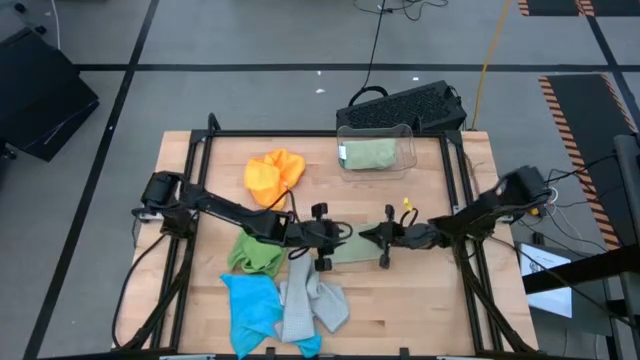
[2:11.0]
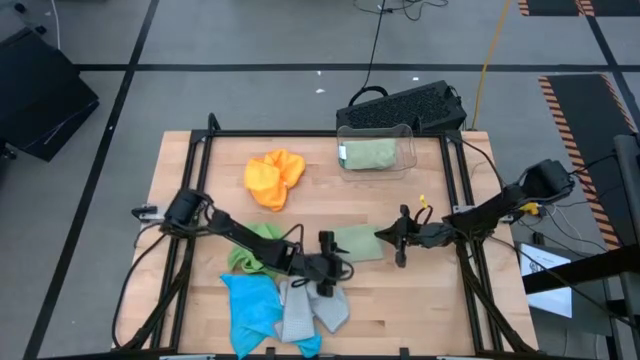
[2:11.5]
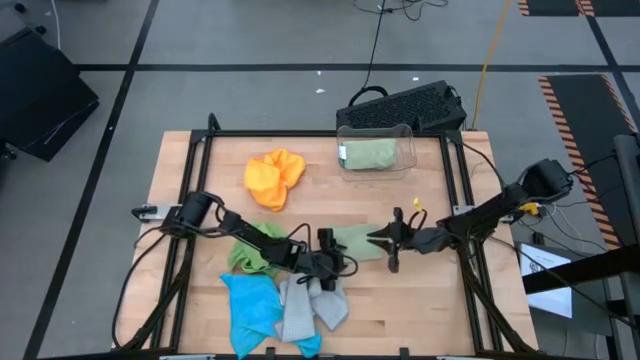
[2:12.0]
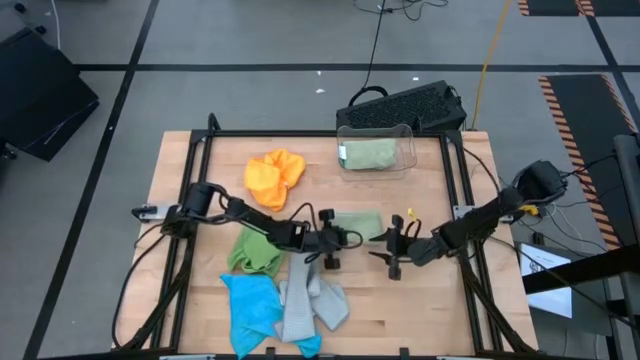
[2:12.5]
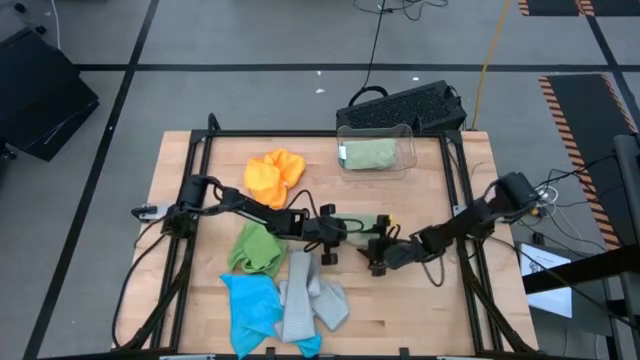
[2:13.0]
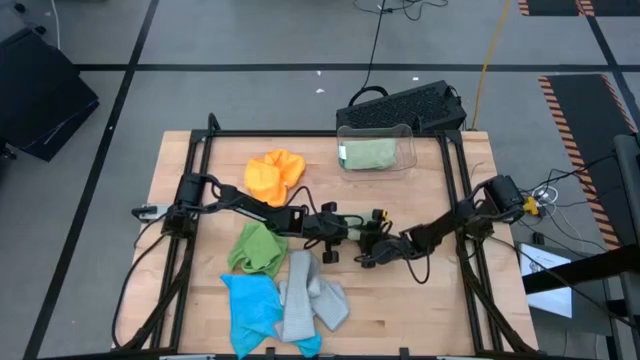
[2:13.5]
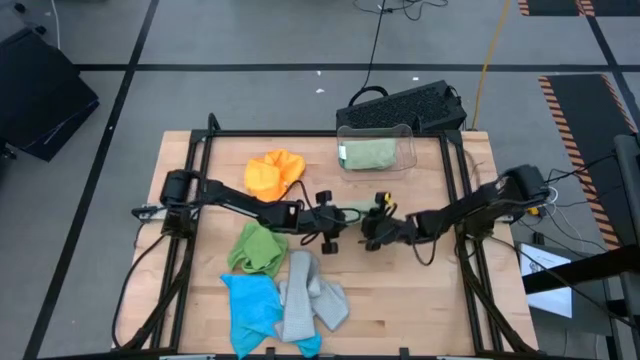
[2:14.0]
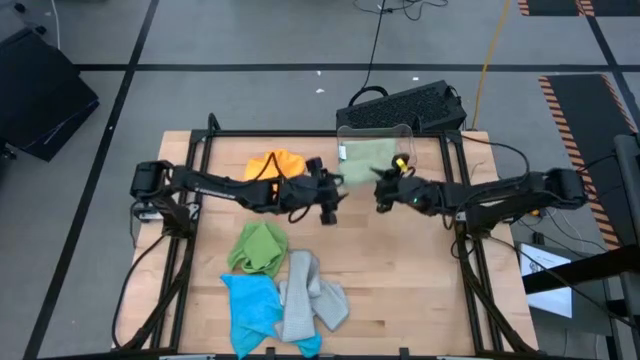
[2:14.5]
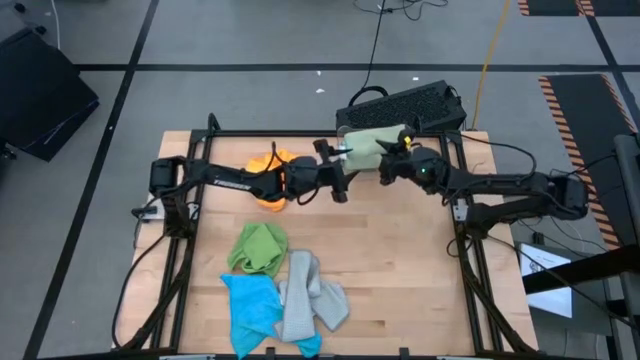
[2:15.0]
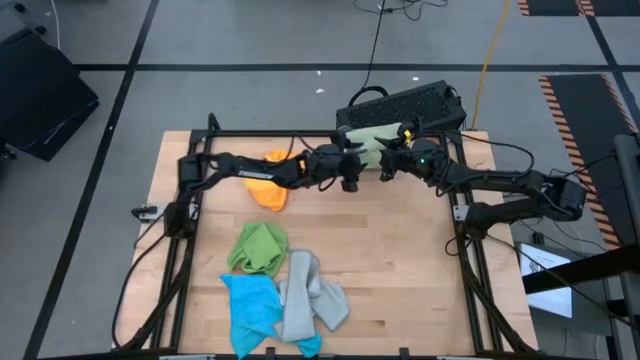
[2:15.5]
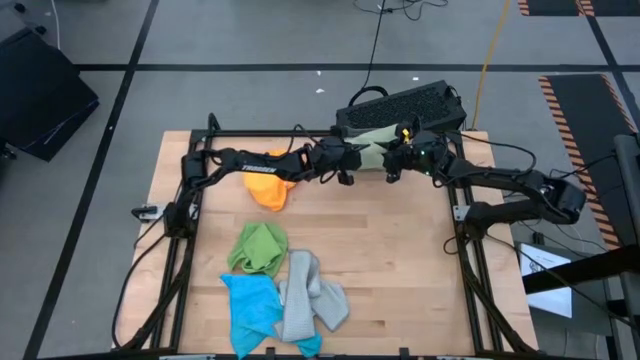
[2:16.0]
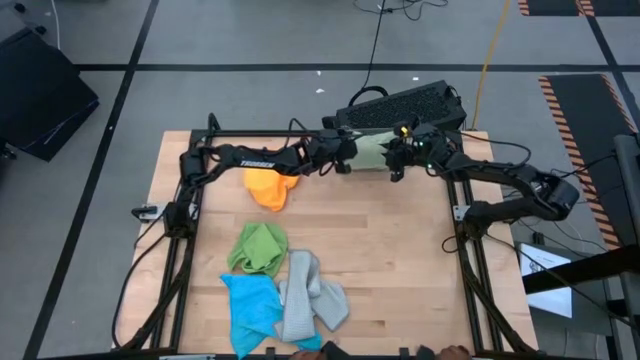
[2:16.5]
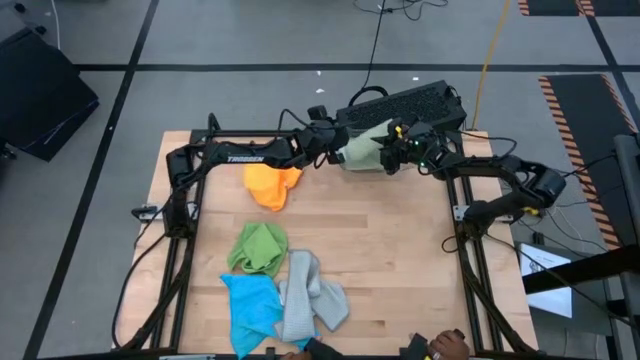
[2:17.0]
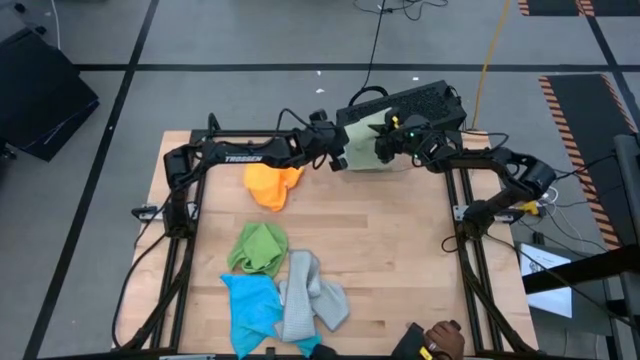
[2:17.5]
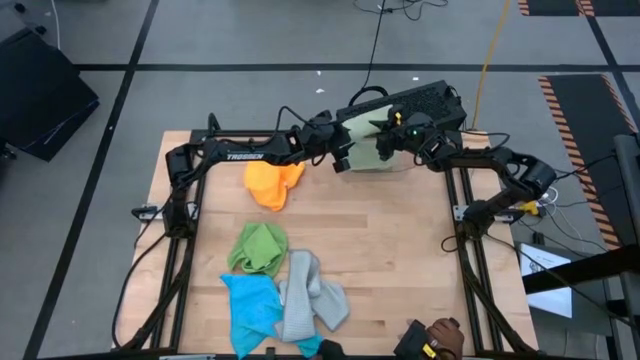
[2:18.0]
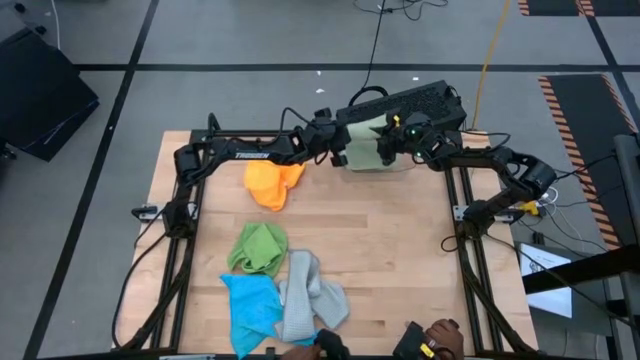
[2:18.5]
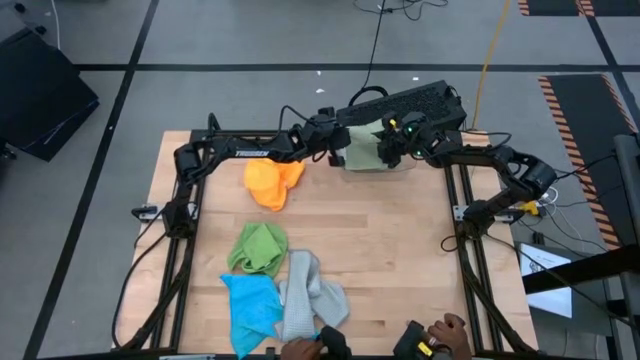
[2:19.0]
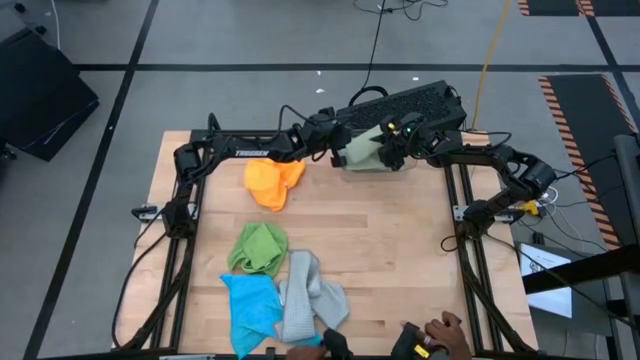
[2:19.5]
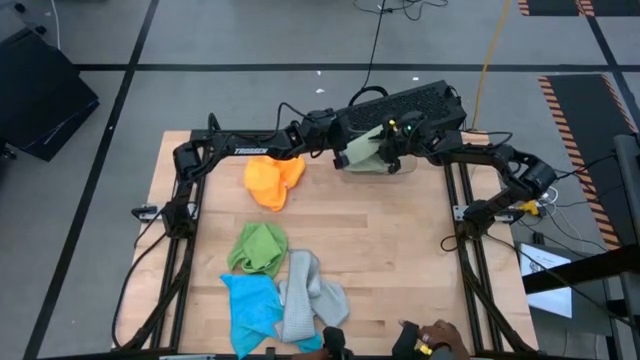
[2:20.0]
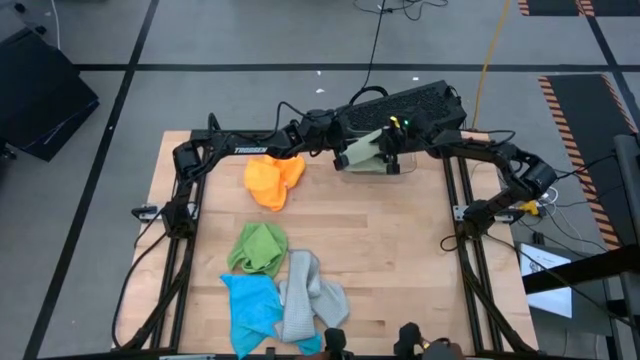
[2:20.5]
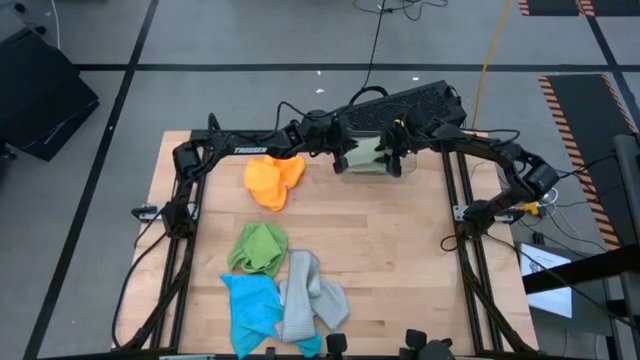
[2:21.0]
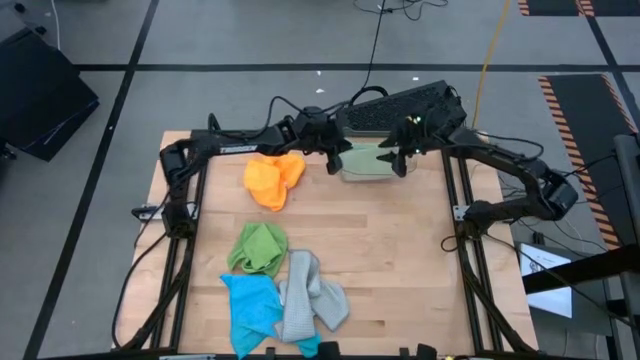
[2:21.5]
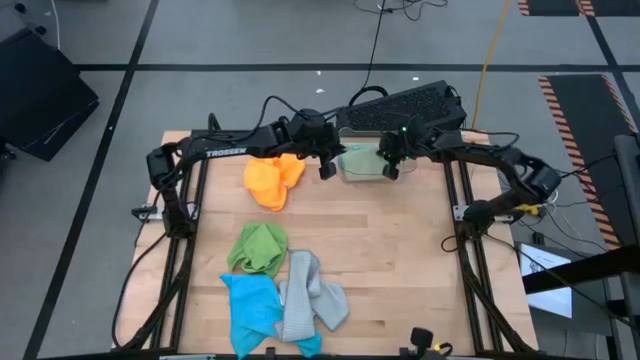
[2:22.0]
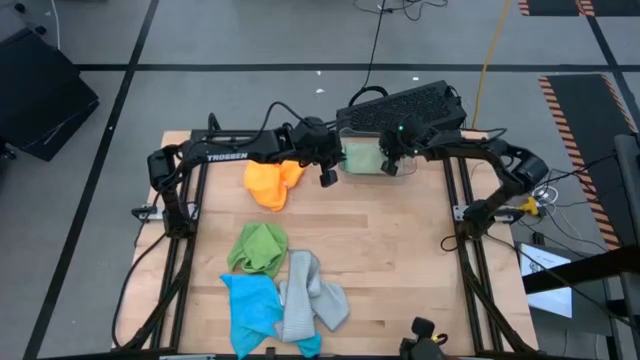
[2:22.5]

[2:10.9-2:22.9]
Task: Fold microfiber towels
Put the folded light green microfiber towel into the transparent bin

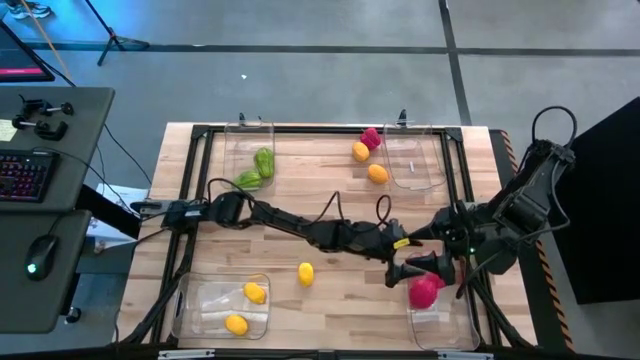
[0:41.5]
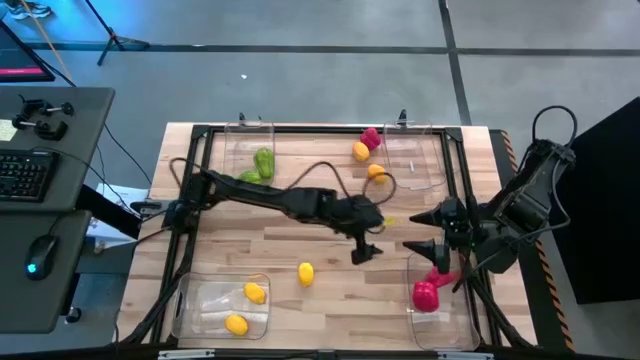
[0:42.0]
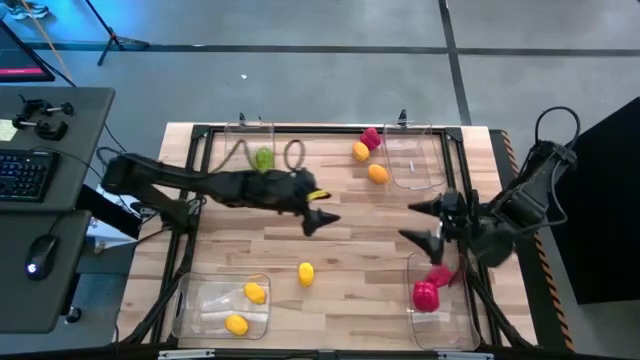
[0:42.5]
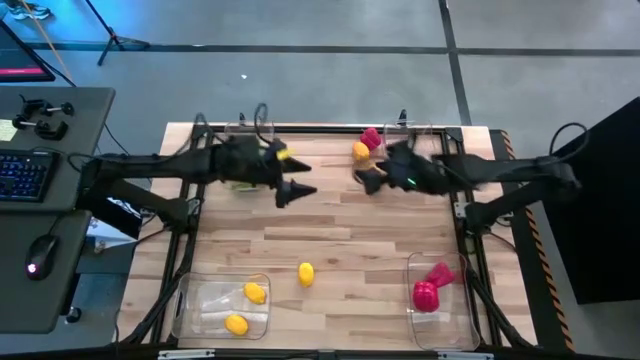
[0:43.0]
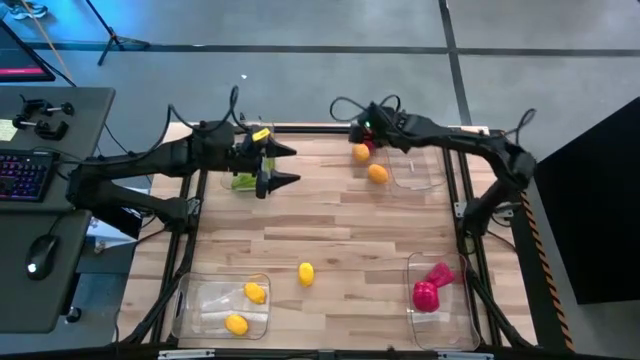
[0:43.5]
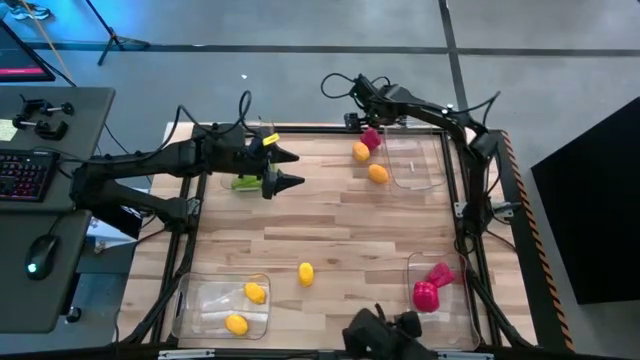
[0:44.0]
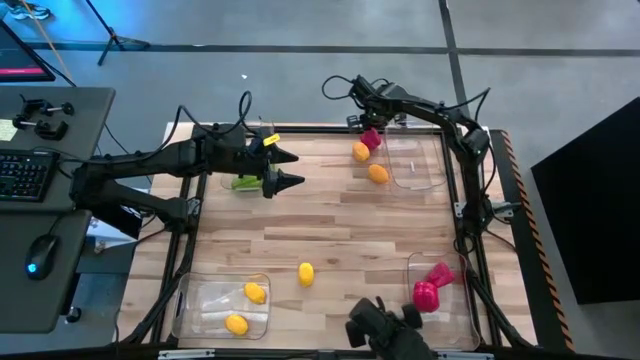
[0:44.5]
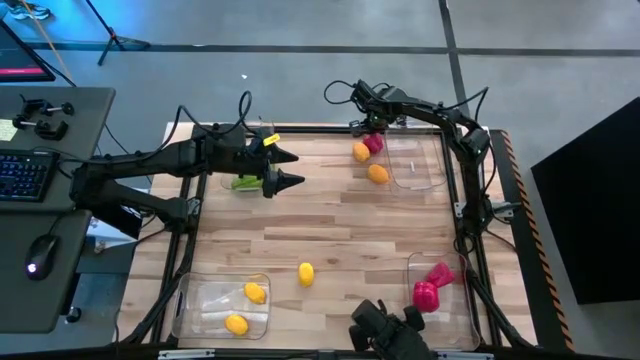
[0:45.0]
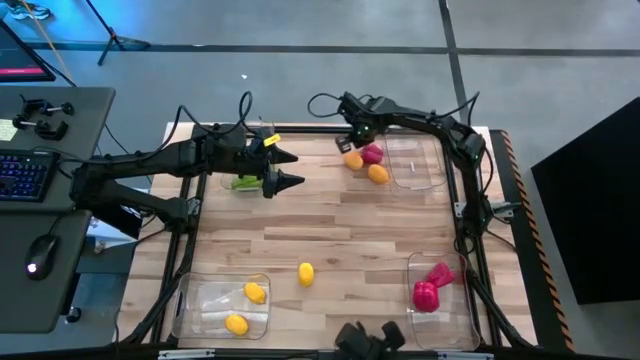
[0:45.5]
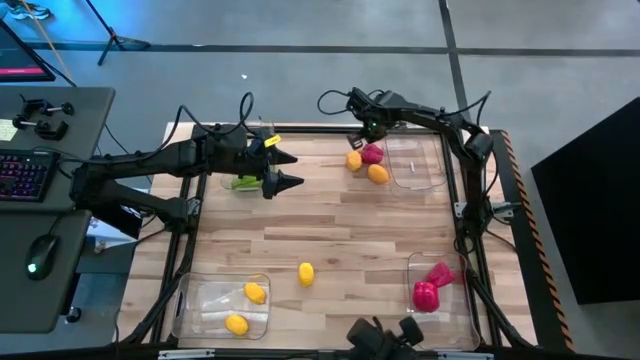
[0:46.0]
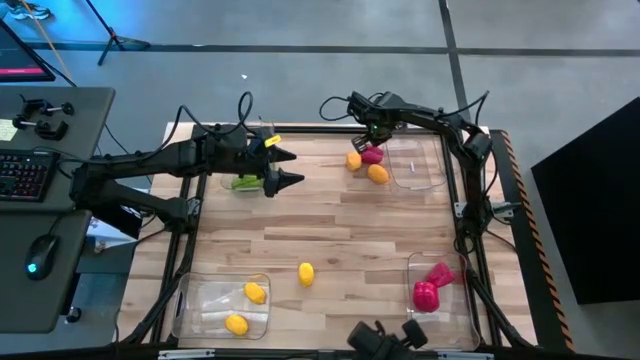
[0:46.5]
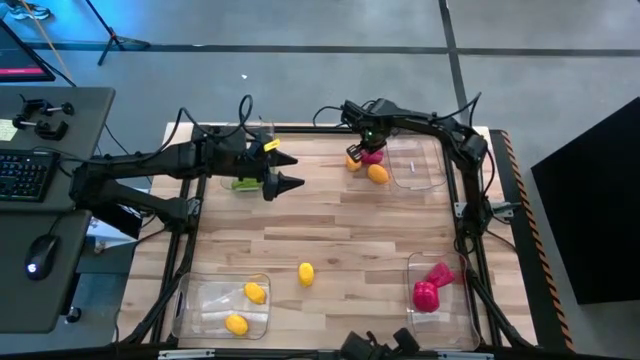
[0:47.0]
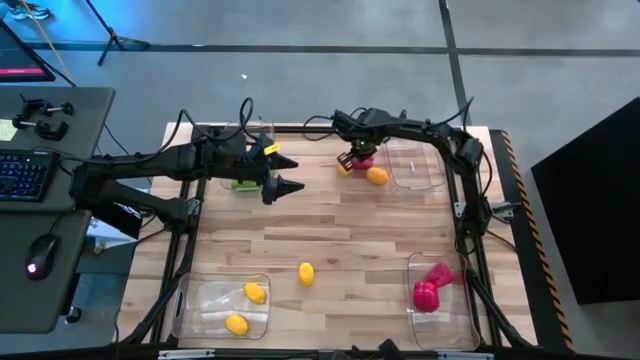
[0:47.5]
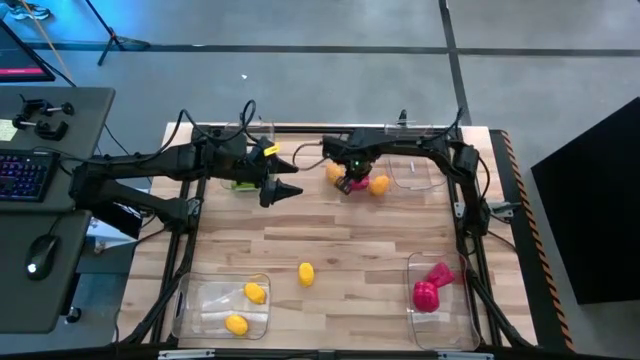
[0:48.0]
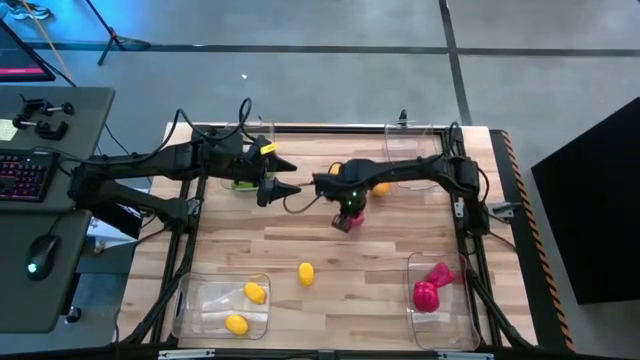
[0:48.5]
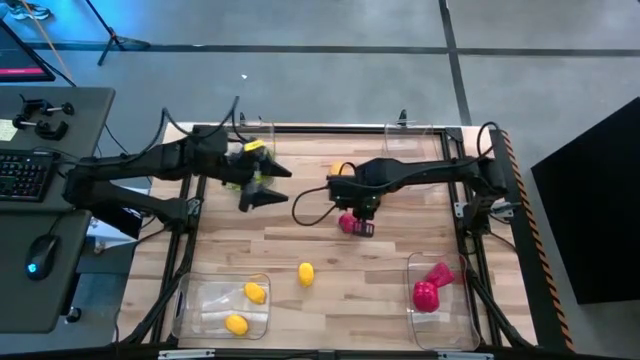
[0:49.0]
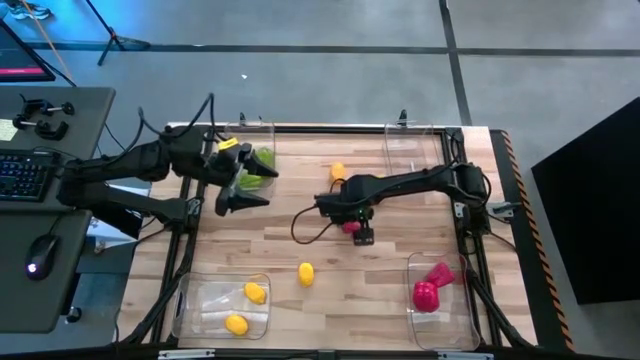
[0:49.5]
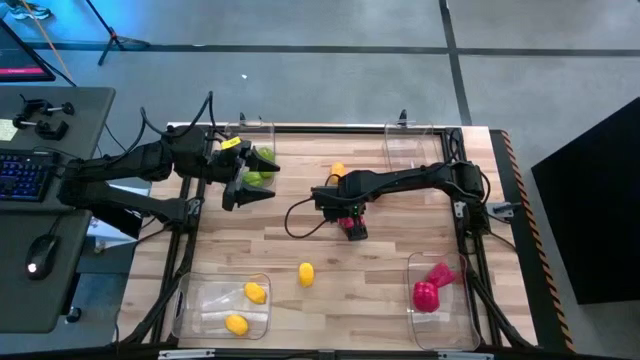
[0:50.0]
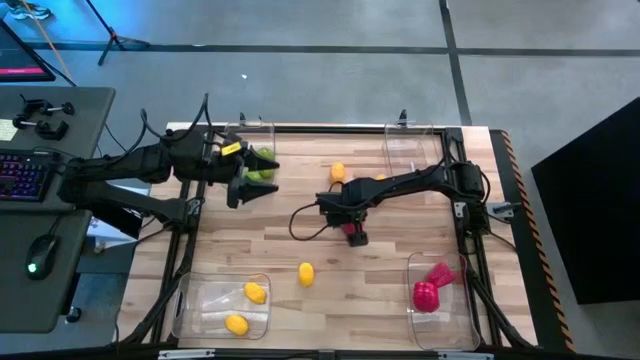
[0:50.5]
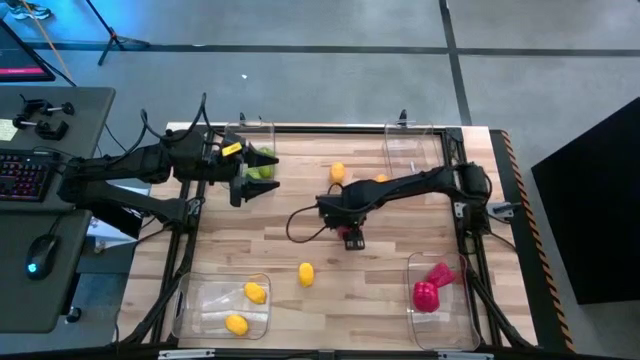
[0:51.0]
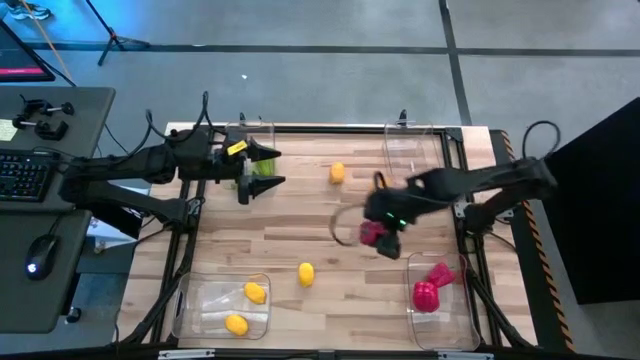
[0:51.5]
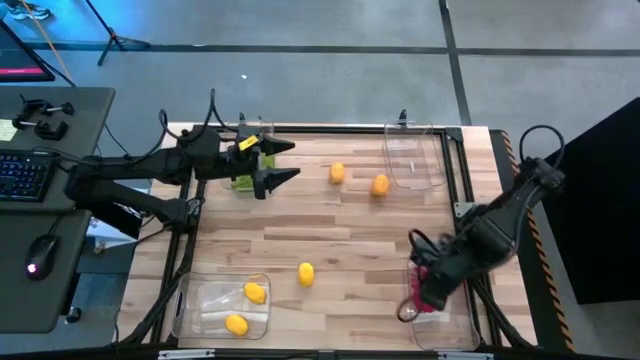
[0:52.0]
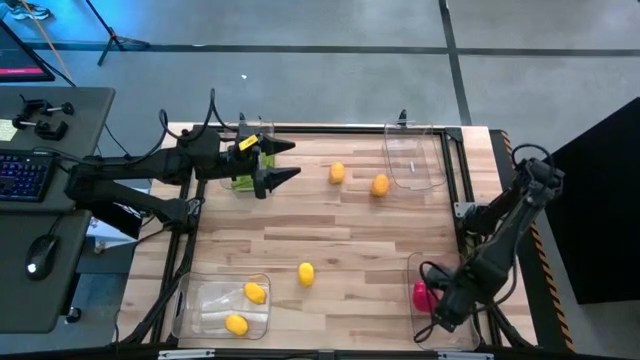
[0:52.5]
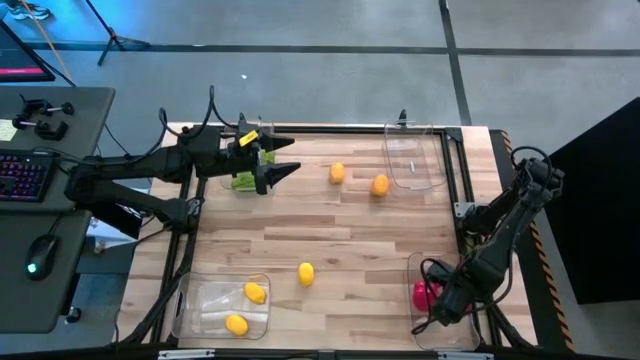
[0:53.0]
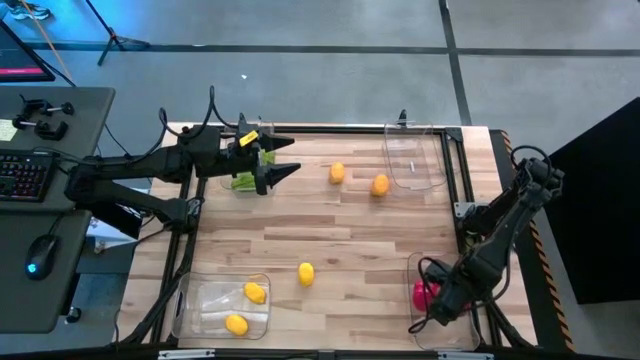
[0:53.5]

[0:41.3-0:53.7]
Task: Sort produce into baskets
Put the bell pepper into the bottom right transparent bin
